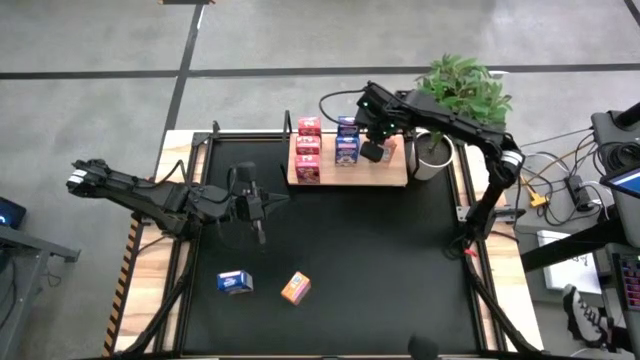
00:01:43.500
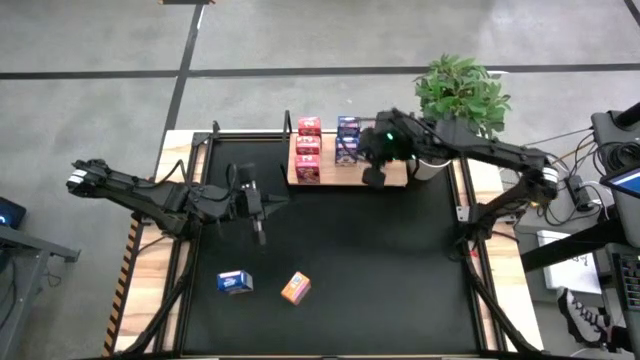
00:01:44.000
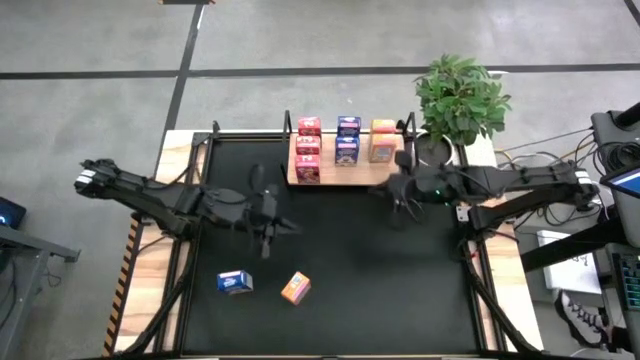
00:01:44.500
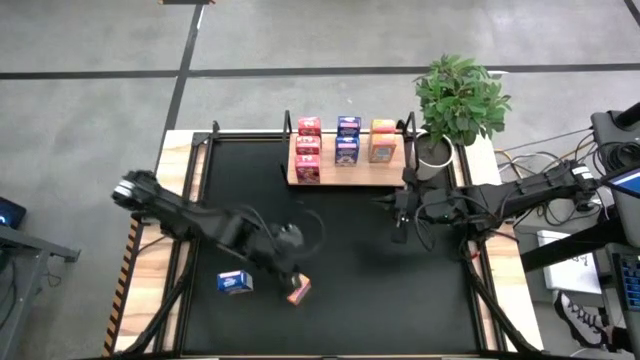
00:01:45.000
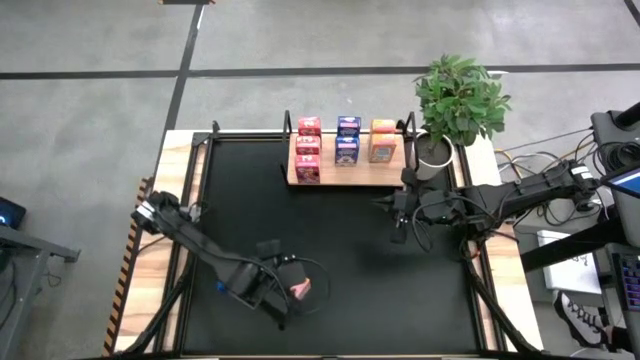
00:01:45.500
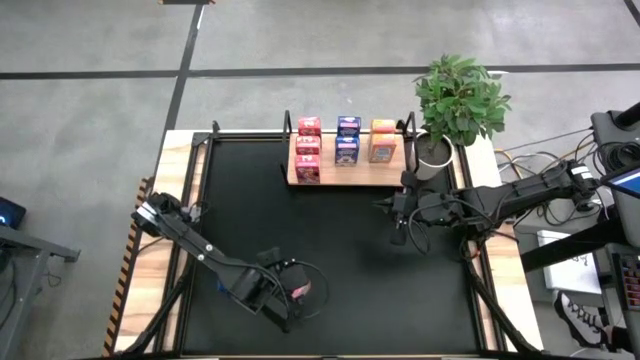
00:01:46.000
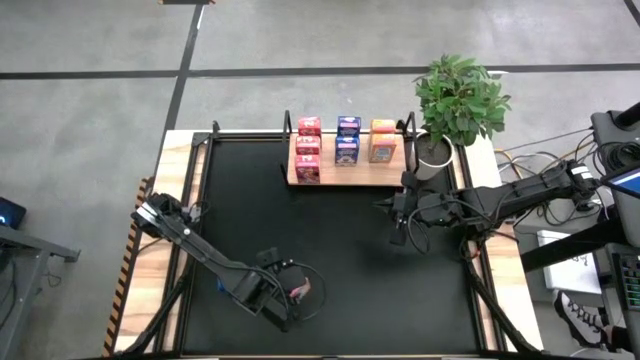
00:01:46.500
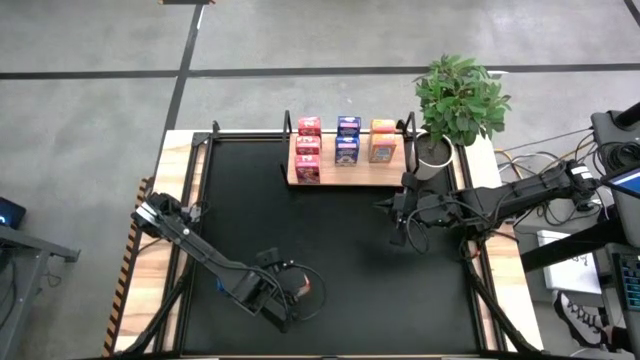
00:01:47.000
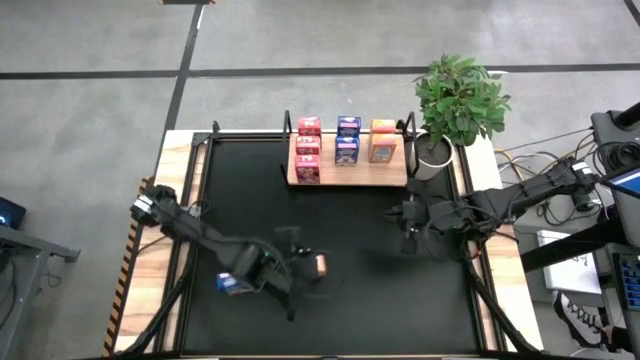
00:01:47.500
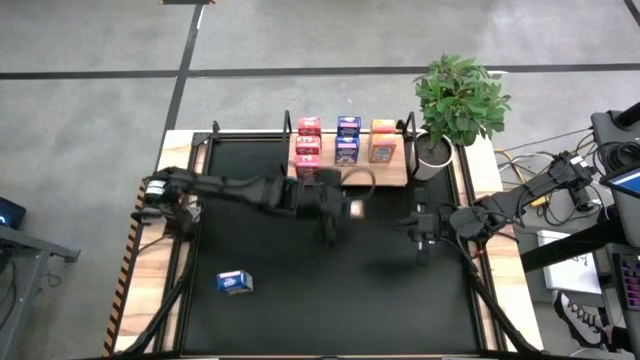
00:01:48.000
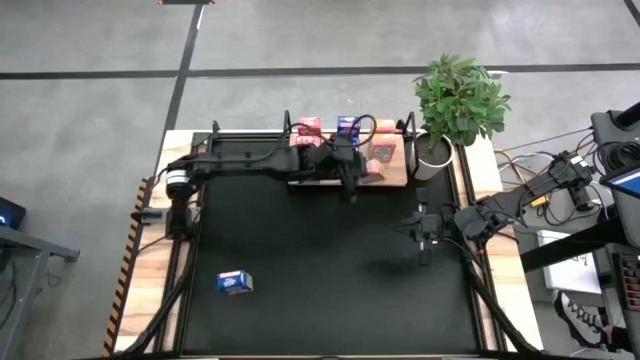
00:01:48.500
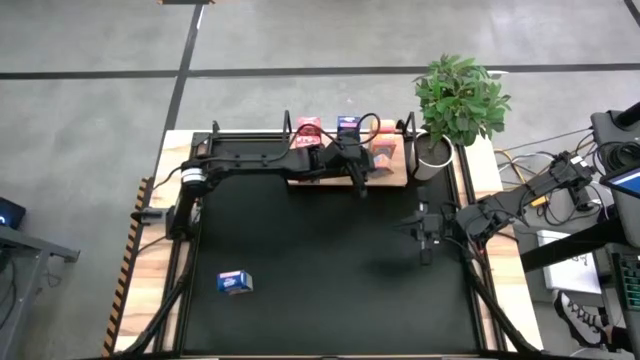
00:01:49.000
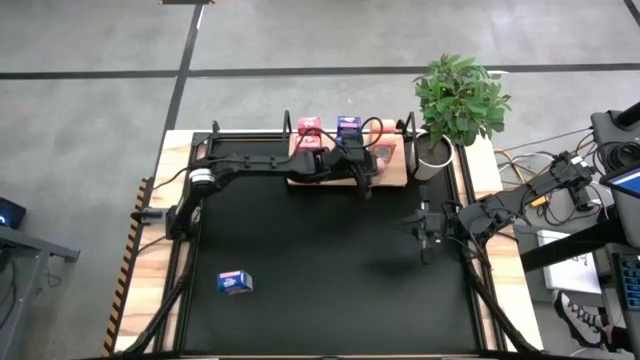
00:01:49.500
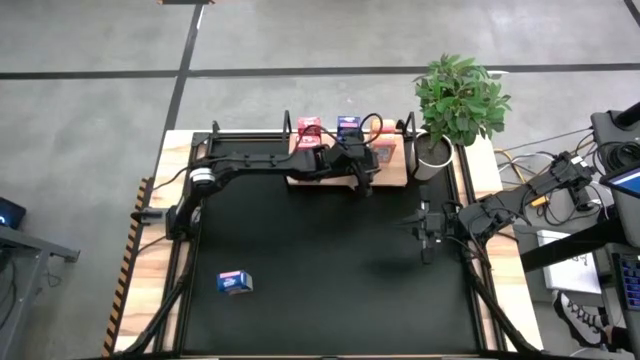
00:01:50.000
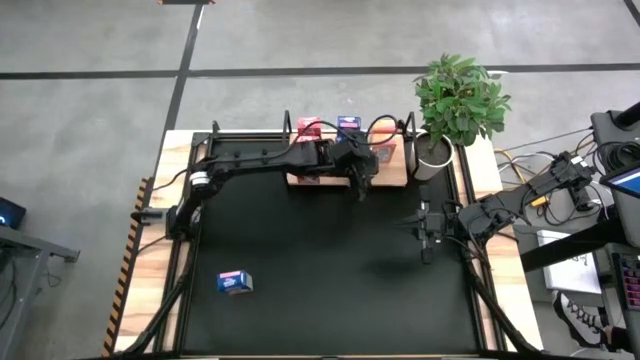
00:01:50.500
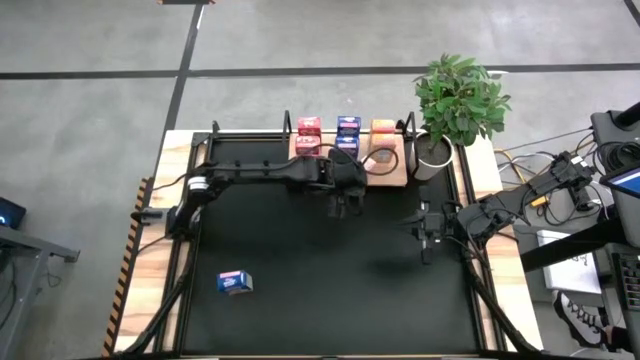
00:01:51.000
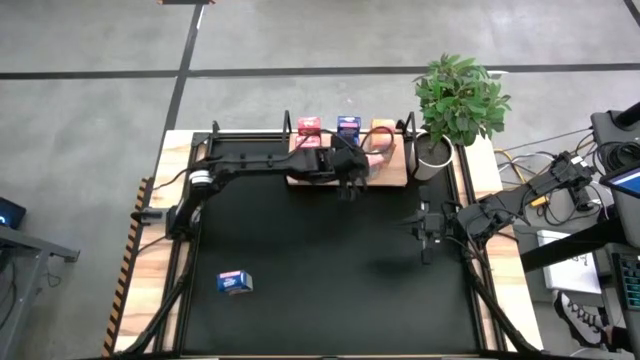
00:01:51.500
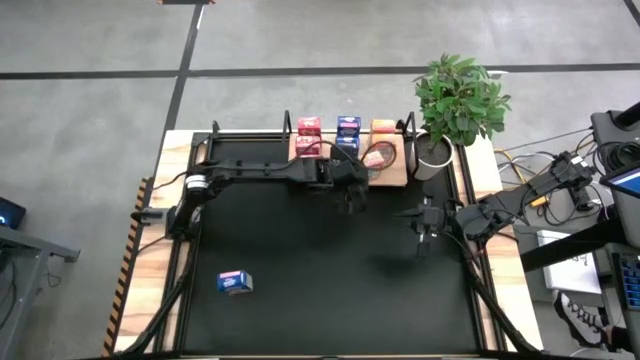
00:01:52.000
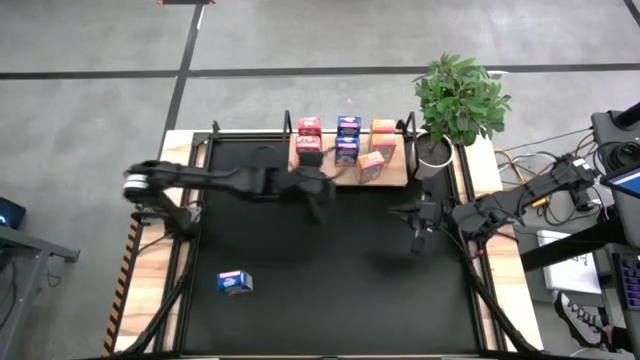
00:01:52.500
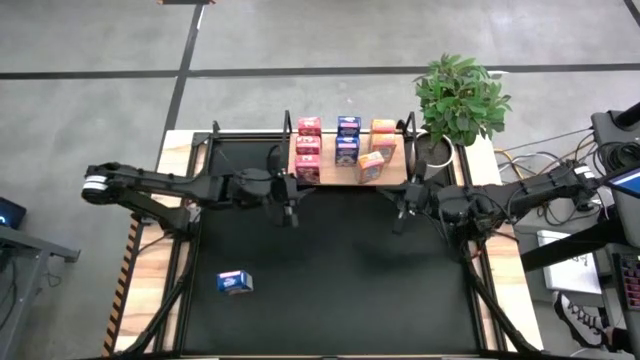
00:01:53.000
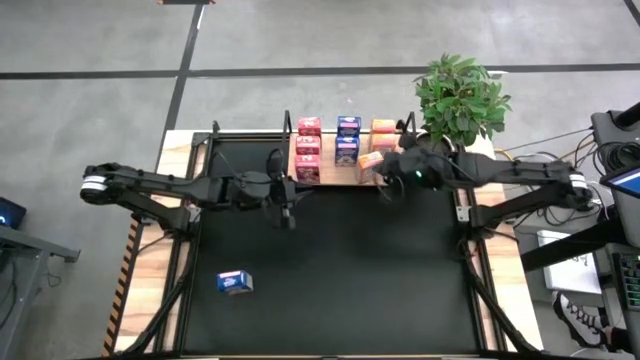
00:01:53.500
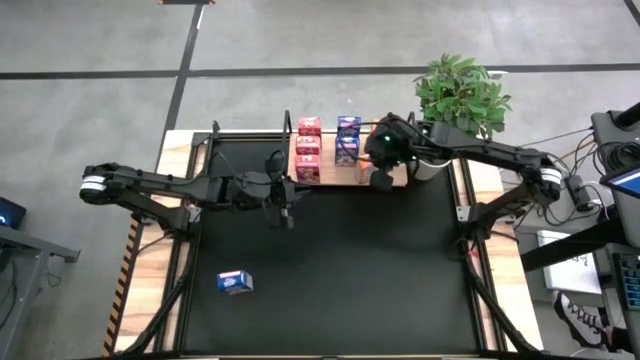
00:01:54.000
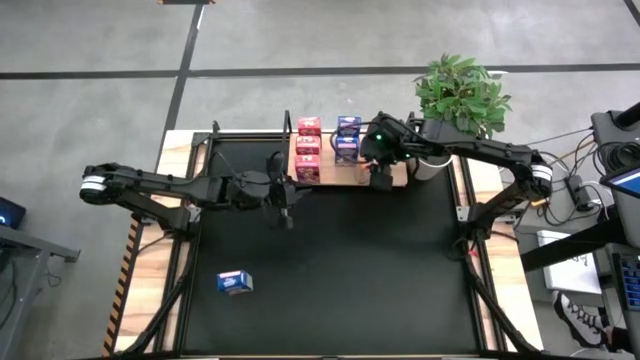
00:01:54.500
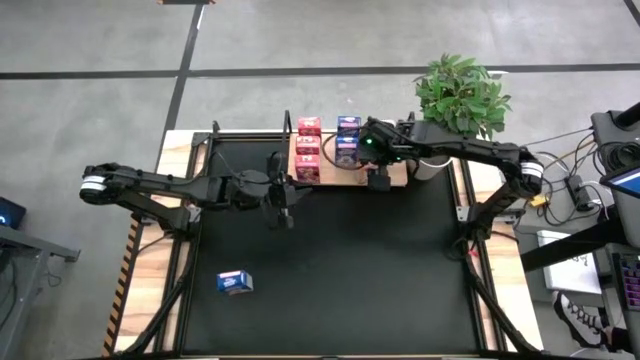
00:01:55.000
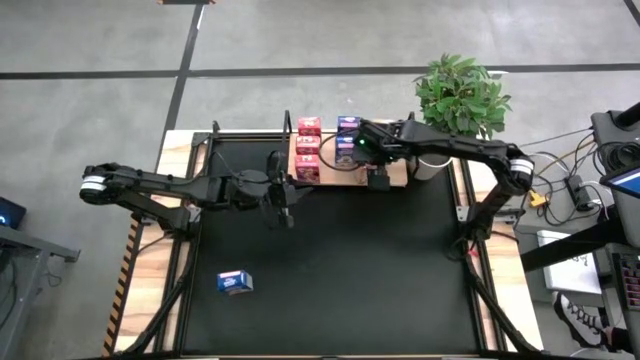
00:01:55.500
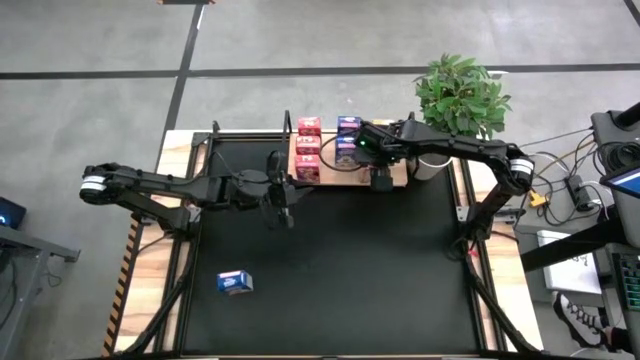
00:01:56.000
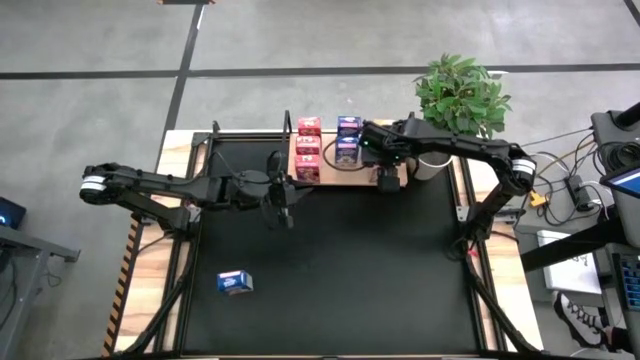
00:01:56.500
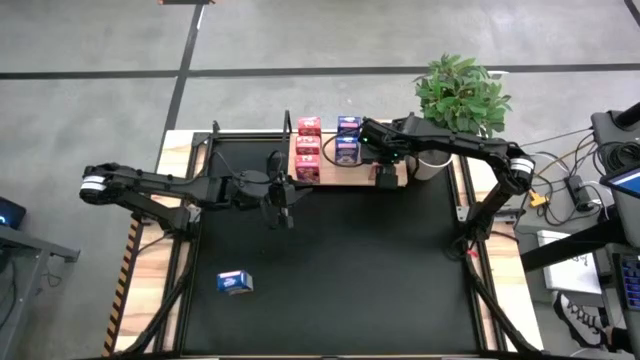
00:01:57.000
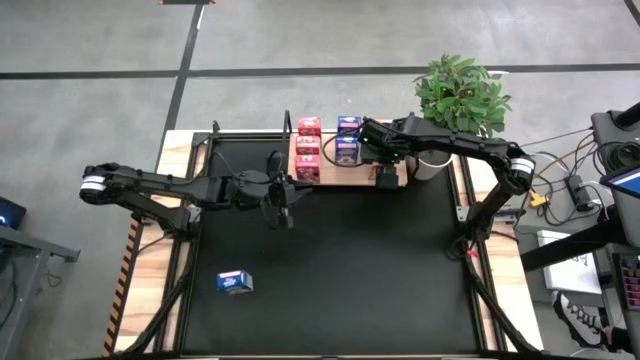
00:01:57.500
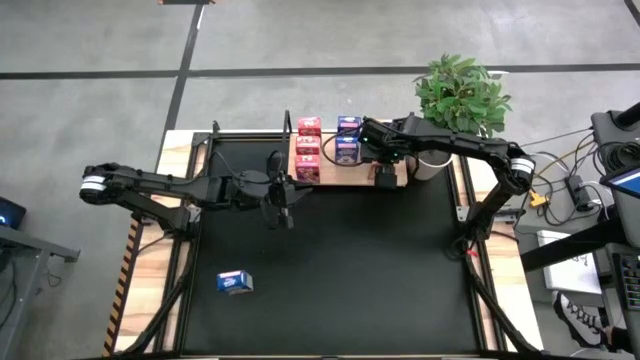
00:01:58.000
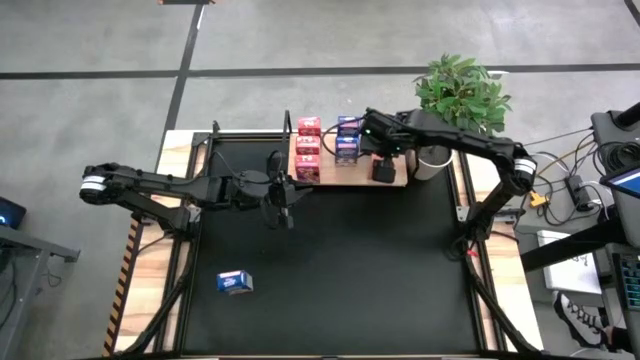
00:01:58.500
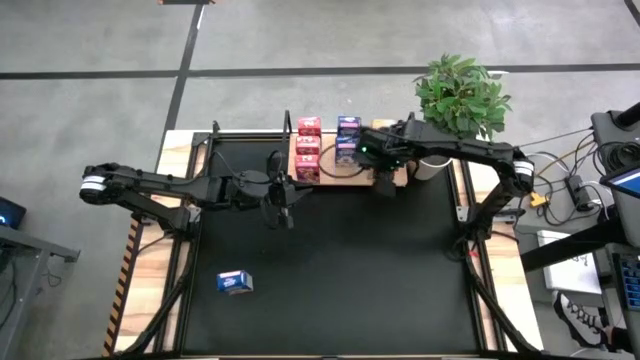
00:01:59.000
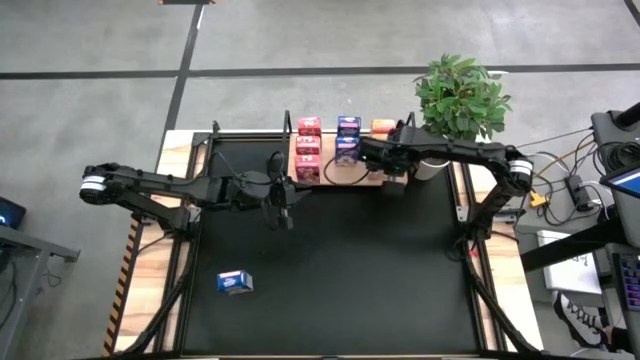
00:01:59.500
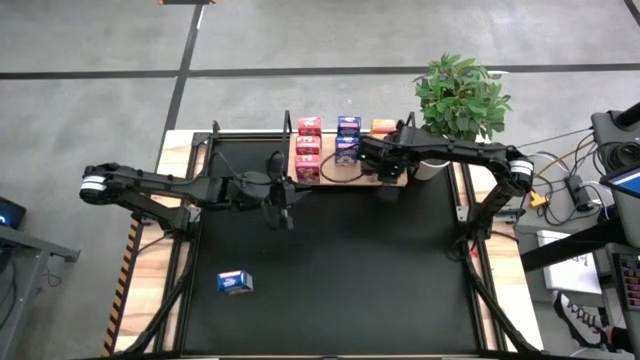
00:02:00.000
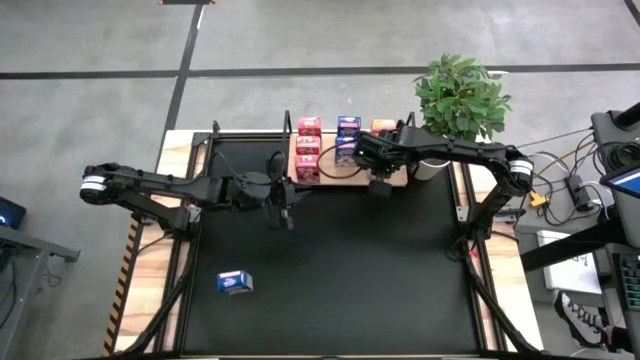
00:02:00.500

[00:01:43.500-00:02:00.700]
Task: Stack cereal on shelf
Put the orange cereal box aligned with the other orange cereal boxes on the shelf

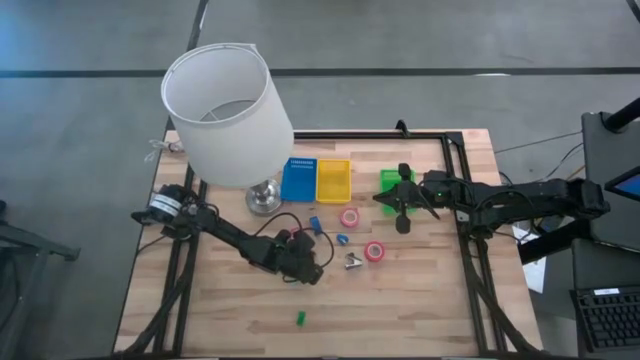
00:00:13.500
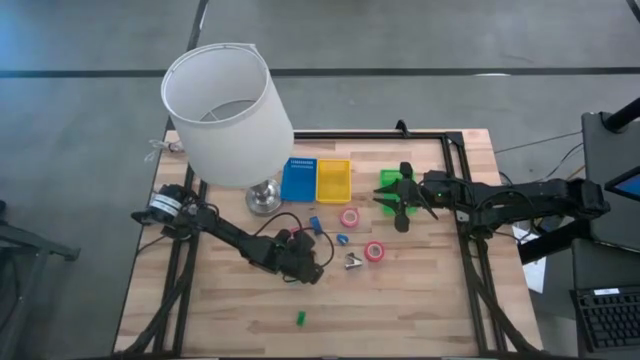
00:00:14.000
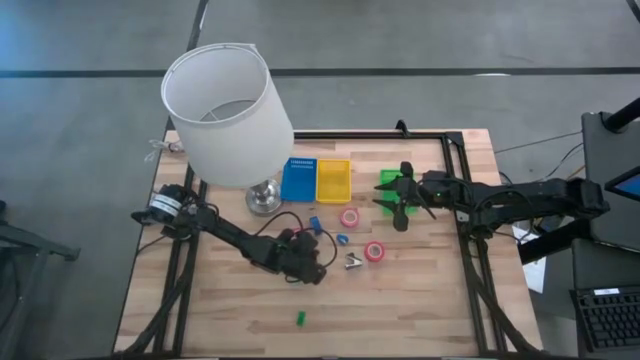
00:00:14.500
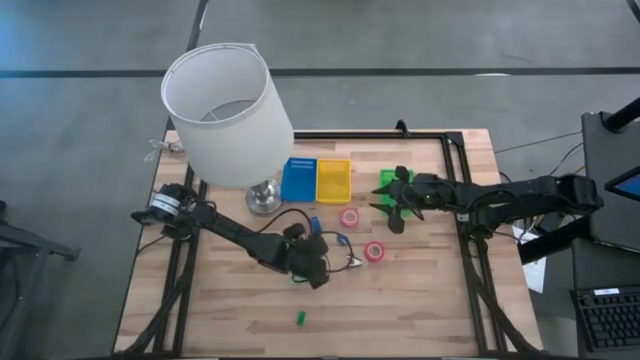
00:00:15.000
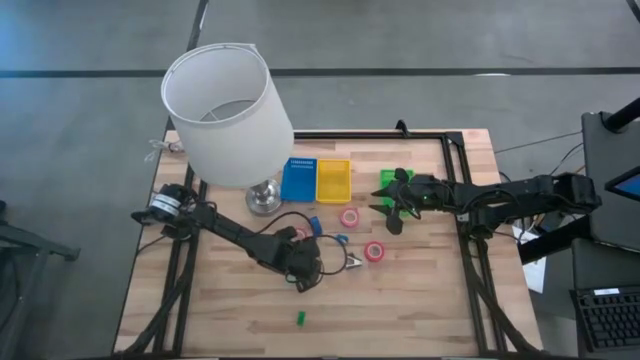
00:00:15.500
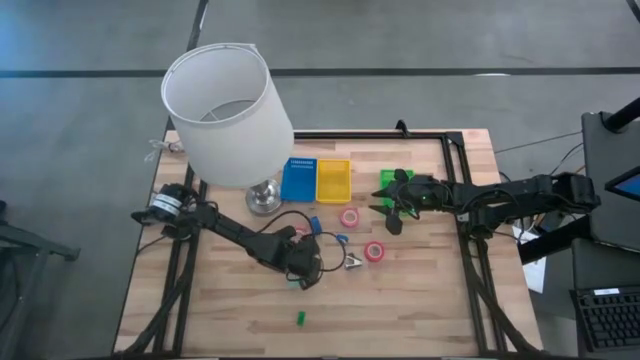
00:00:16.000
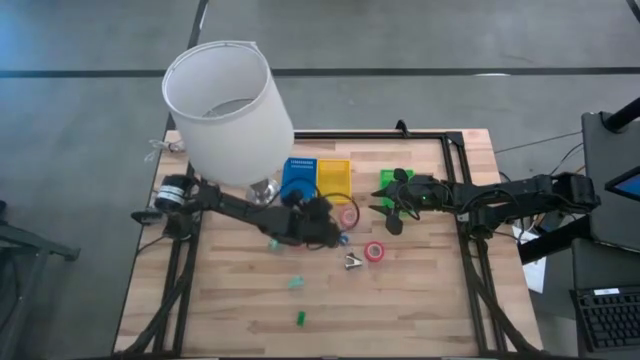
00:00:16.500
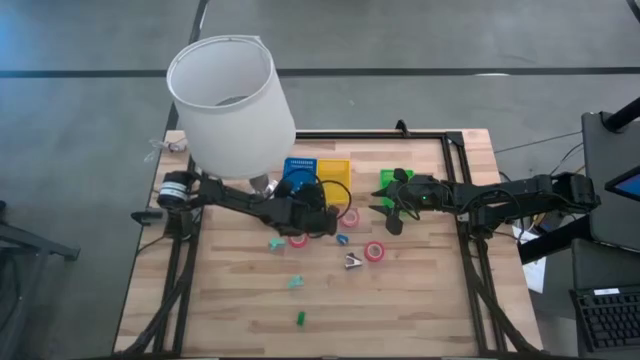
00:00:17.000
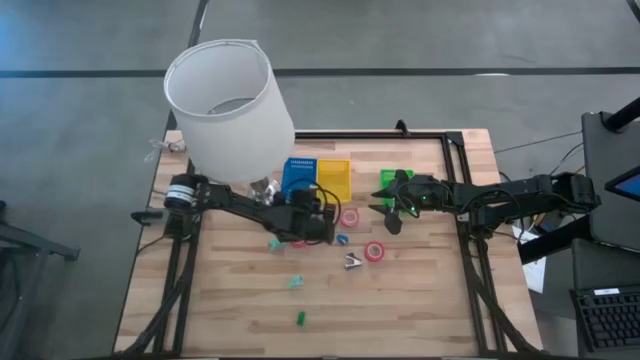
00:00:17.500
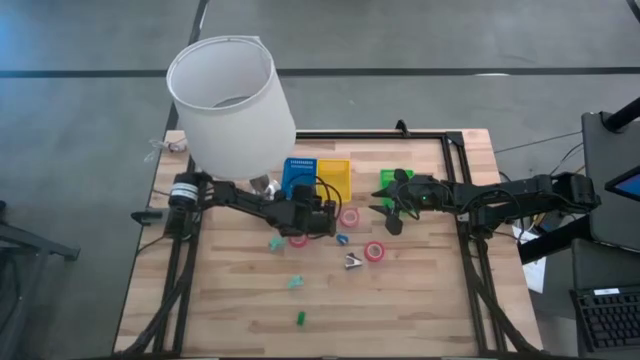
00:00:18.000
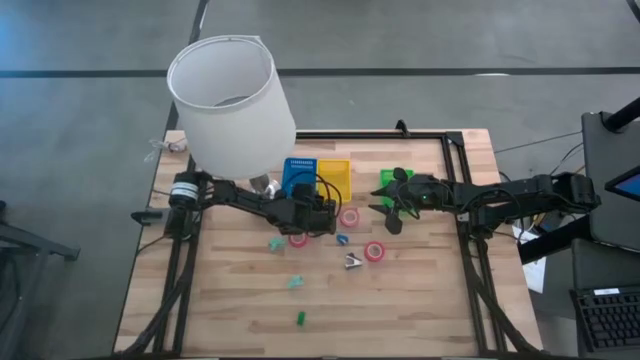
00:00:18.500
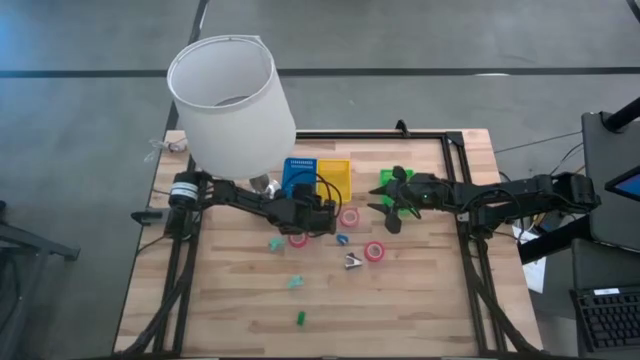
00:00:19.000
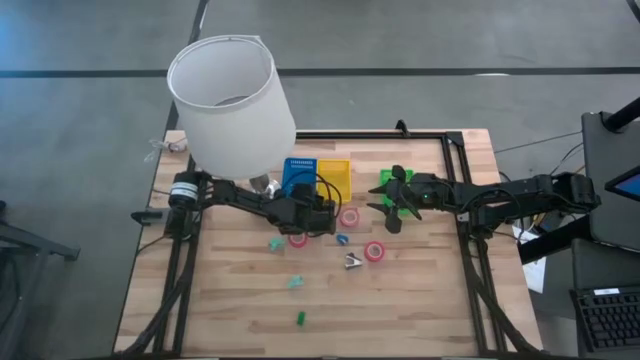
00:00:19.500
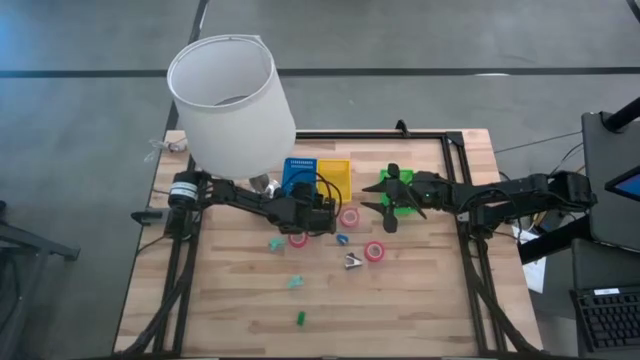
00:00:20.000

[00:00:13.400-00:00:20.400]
Task: Pick and place Stapler, Stapler remover, tape
Put the yellow stapler into the blue bin
